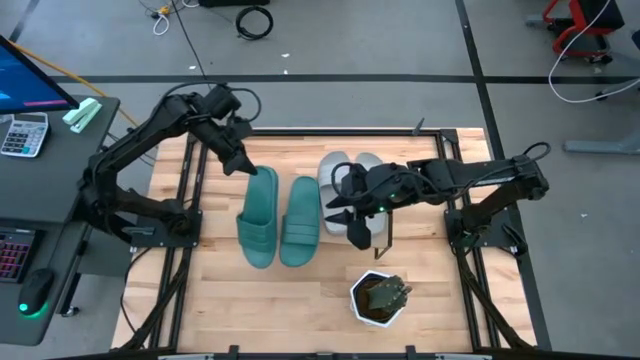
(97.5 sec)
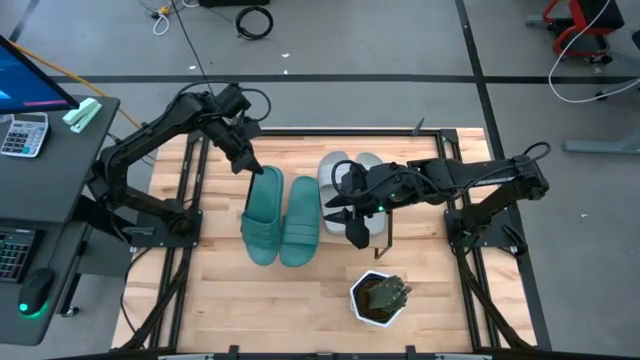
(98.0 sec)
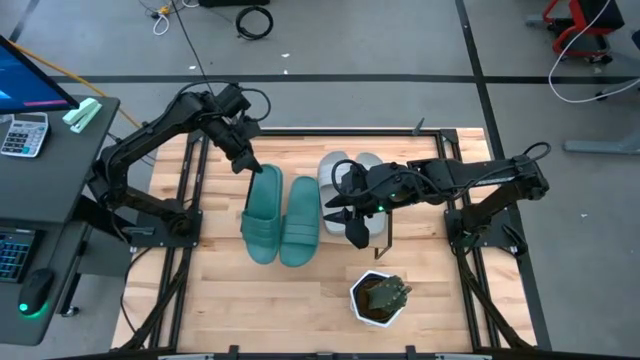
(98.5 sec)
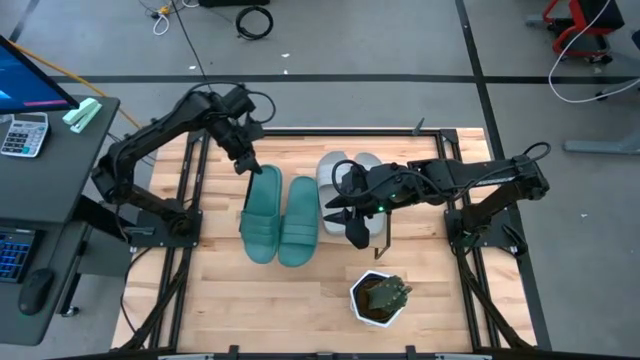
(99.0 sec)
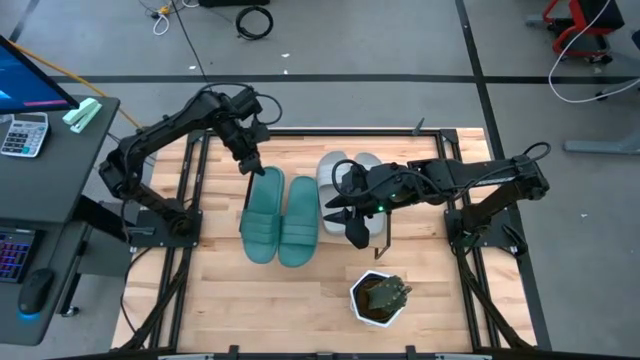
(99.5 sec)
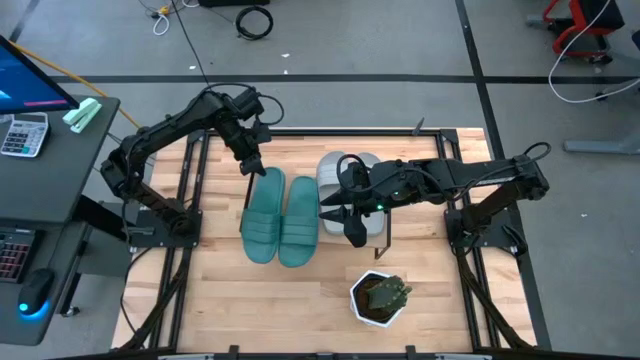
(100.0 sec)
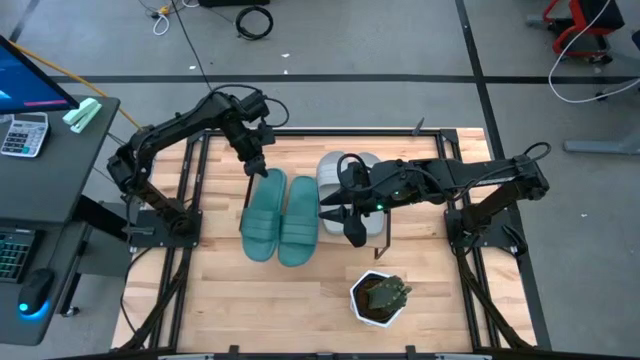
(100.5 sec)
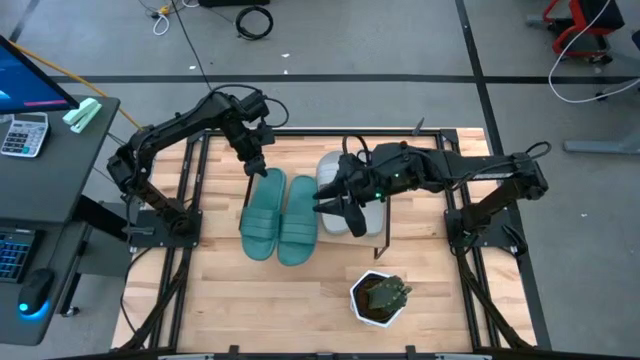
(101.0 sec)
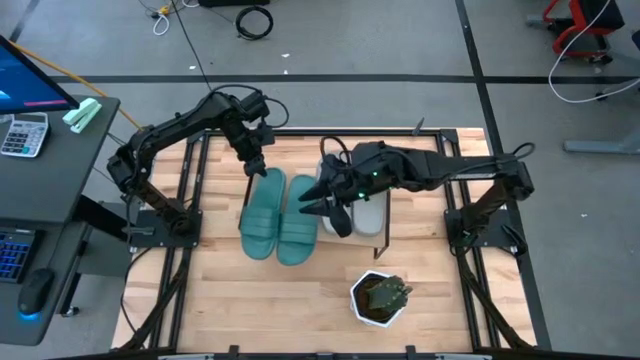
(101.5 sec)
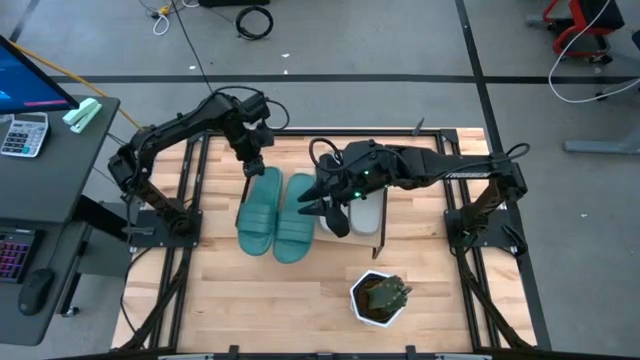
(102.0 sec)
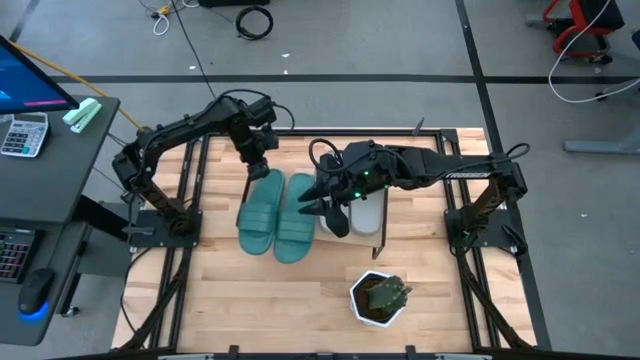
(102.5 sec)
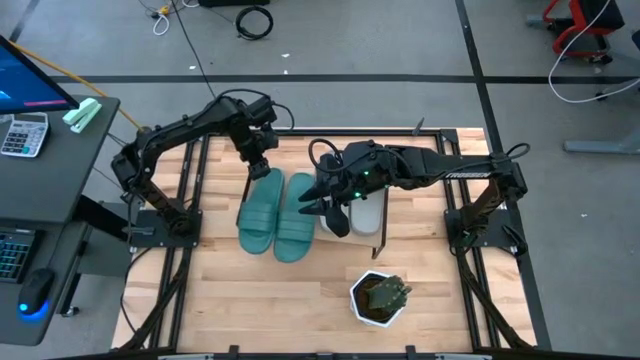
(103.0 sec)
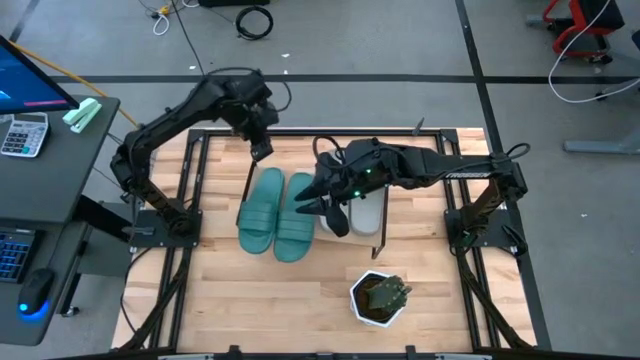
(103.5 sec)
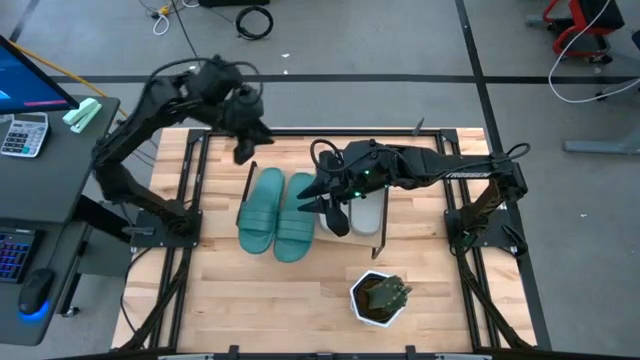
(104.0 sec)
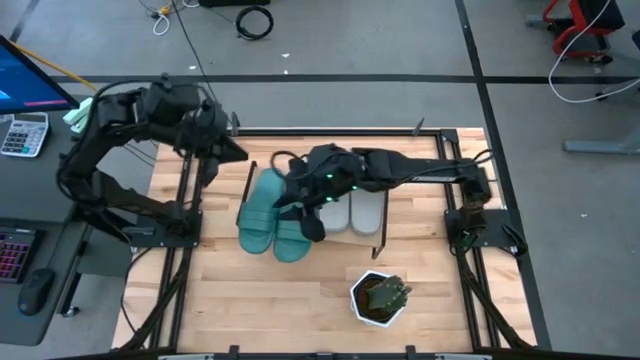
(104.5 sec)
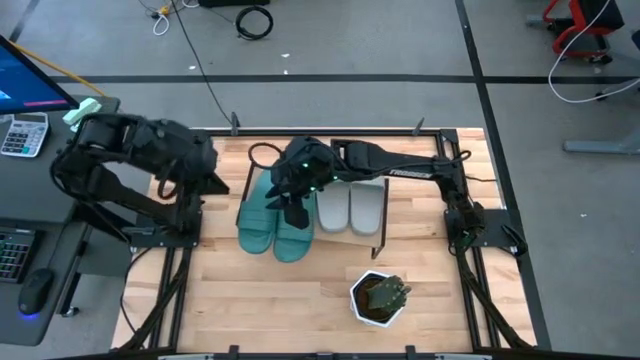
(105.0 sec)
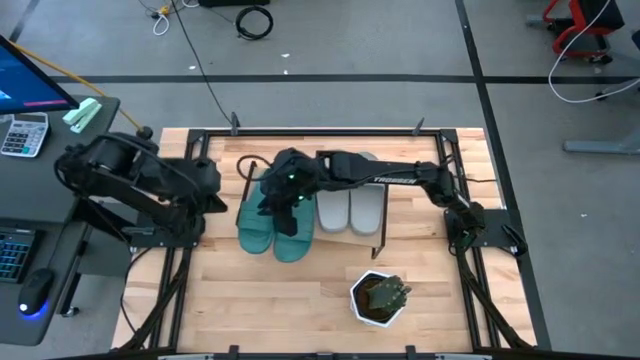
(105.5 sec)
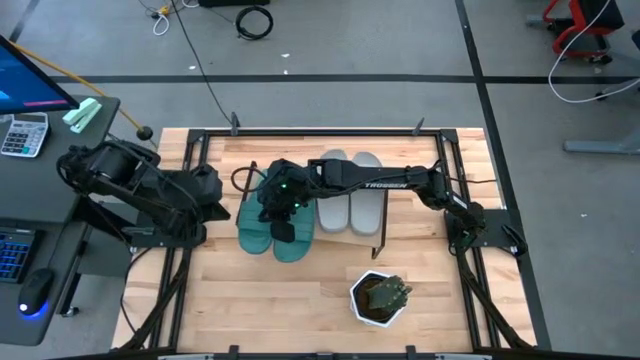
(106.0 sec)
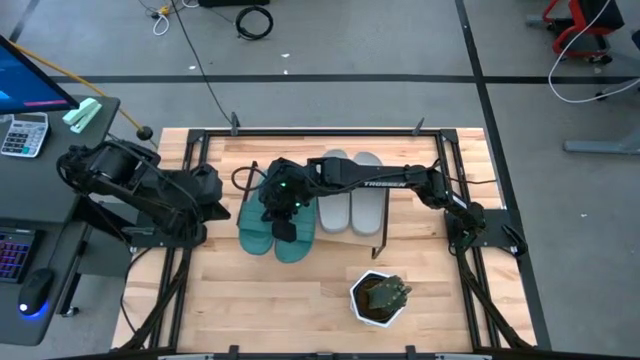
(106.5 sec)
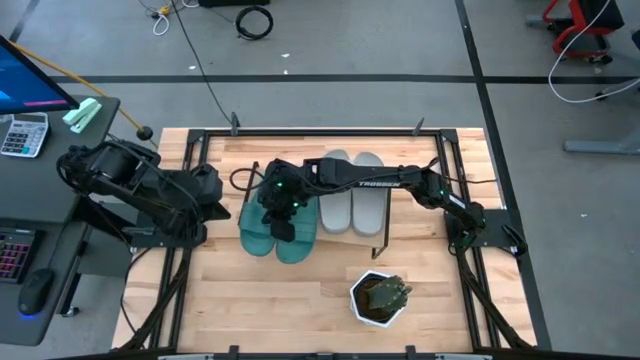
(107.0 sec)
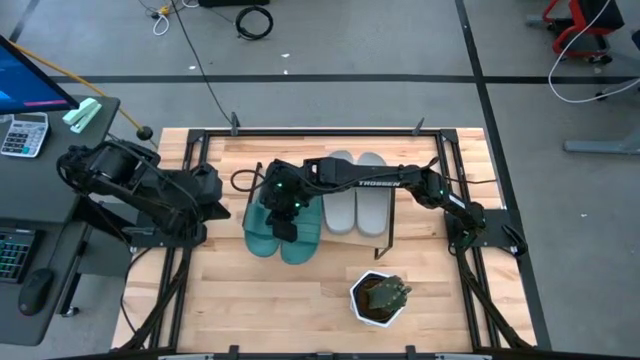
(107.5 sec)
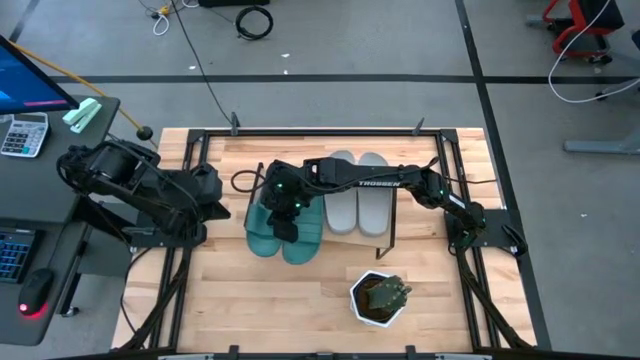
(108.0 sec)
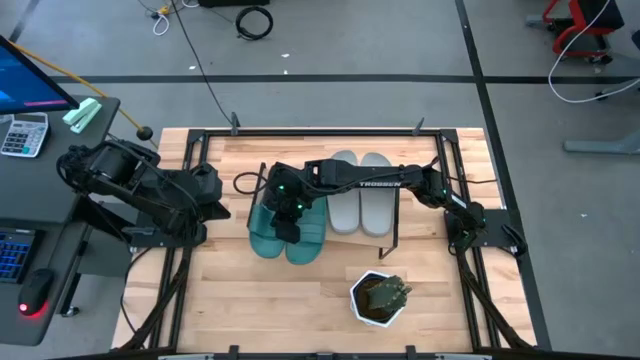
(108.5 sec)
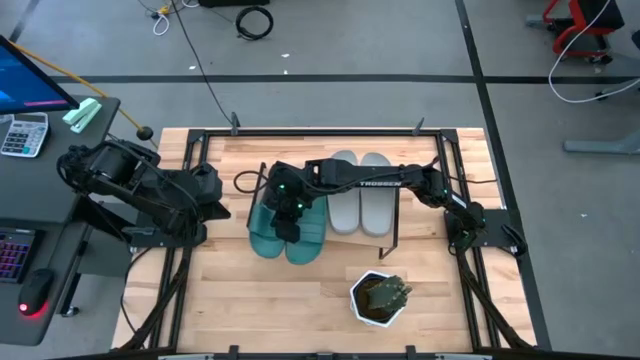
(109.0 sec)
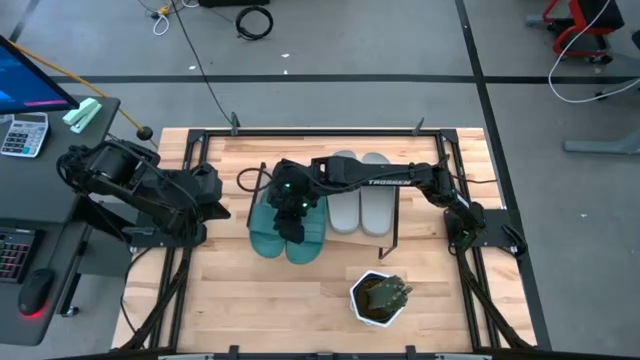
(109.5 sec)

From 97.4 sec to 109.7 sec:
Task: Pick and place slides into the shelf
Put the green slipper on the shelf

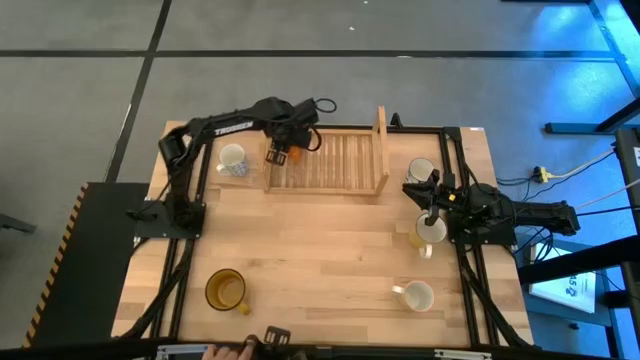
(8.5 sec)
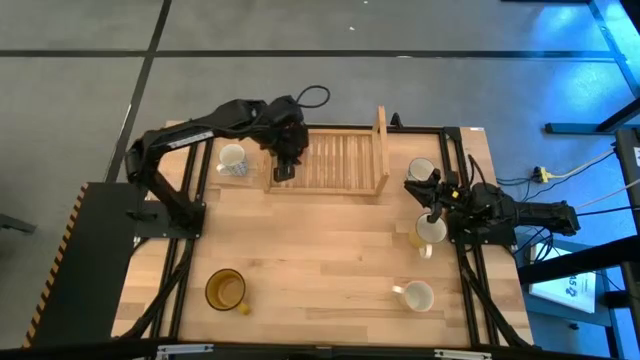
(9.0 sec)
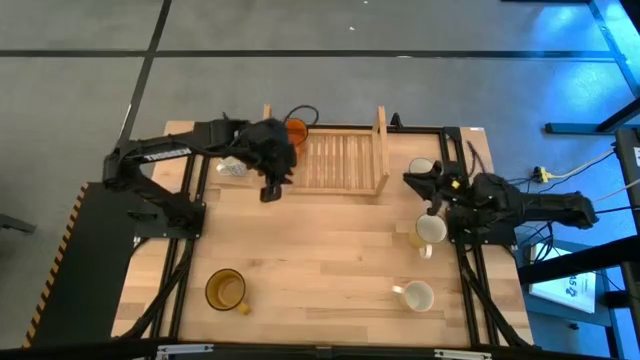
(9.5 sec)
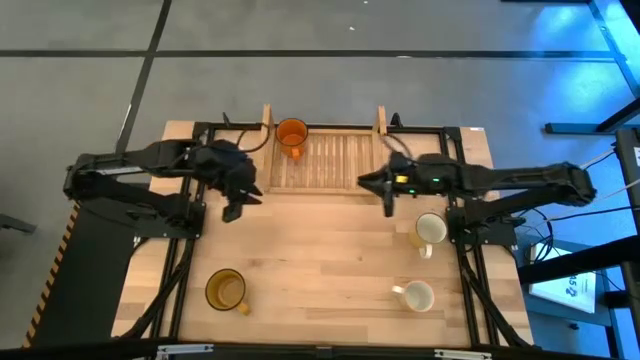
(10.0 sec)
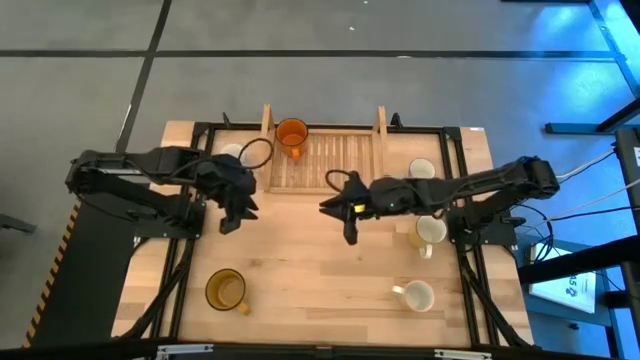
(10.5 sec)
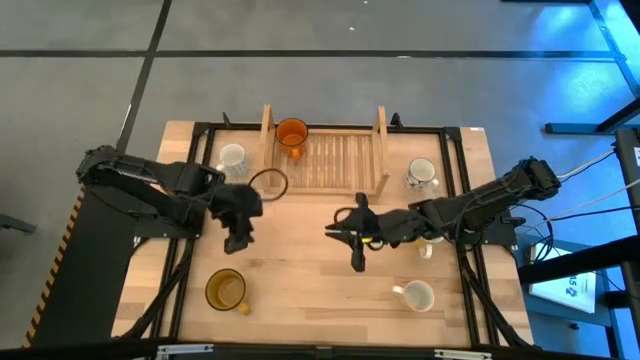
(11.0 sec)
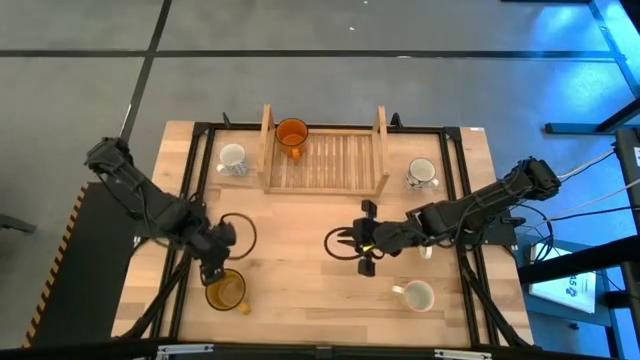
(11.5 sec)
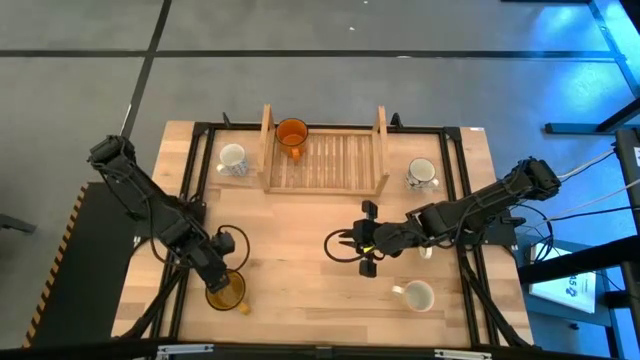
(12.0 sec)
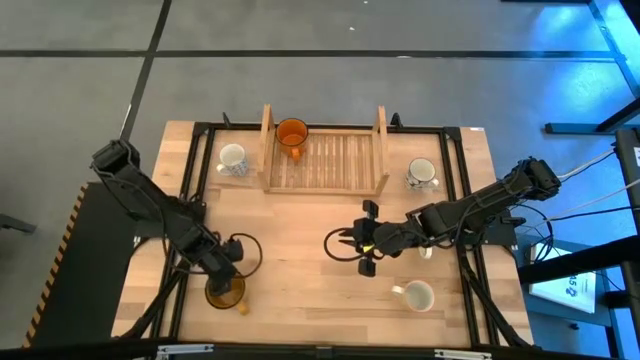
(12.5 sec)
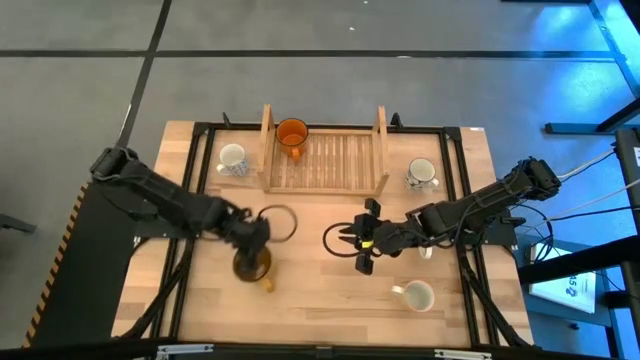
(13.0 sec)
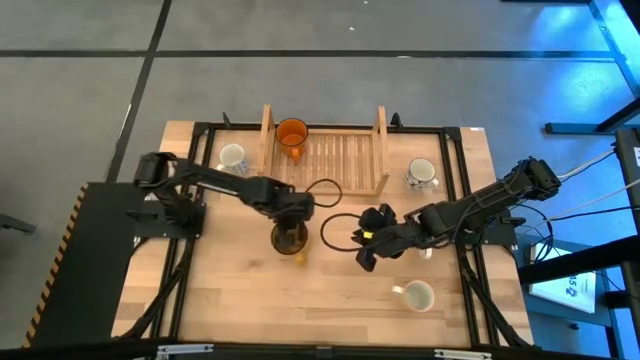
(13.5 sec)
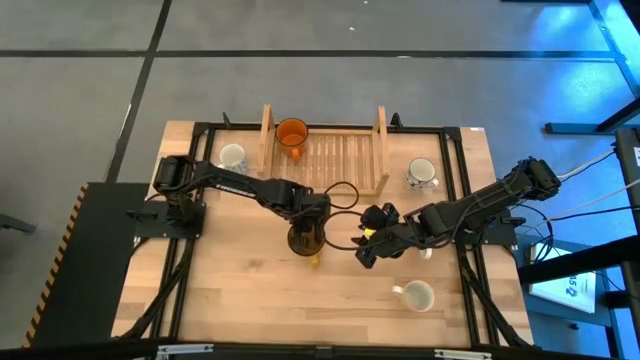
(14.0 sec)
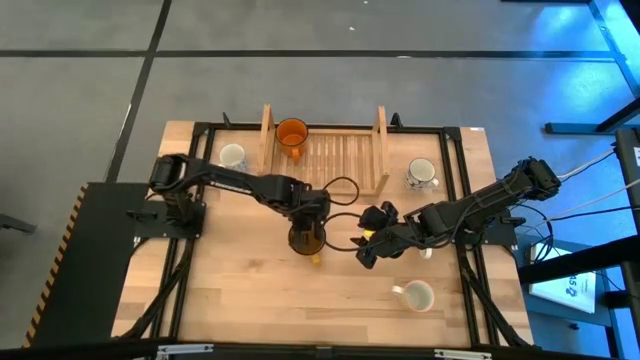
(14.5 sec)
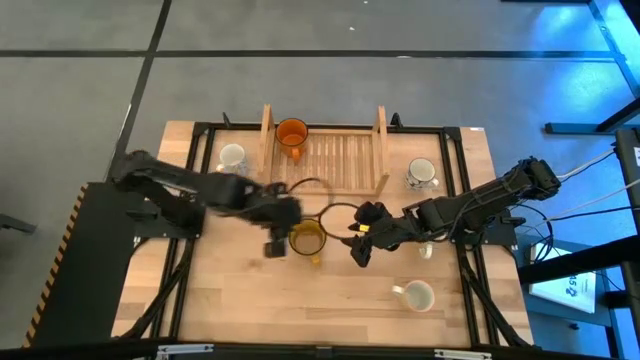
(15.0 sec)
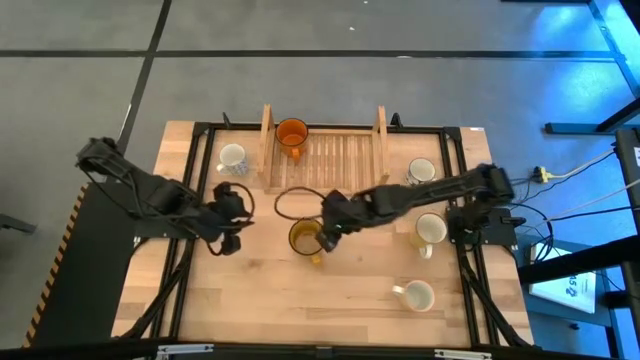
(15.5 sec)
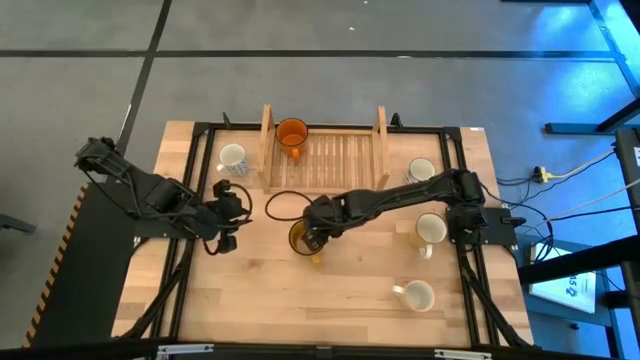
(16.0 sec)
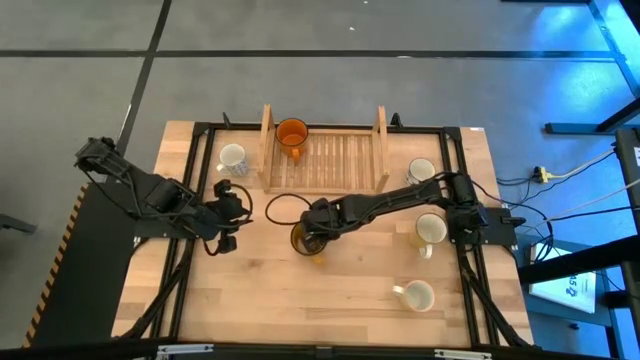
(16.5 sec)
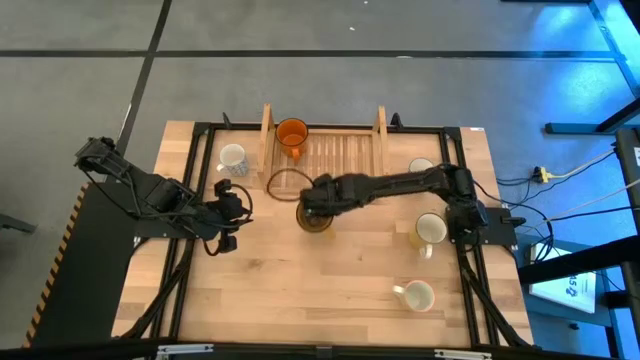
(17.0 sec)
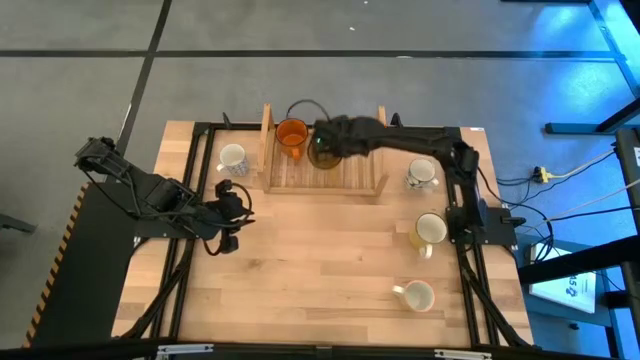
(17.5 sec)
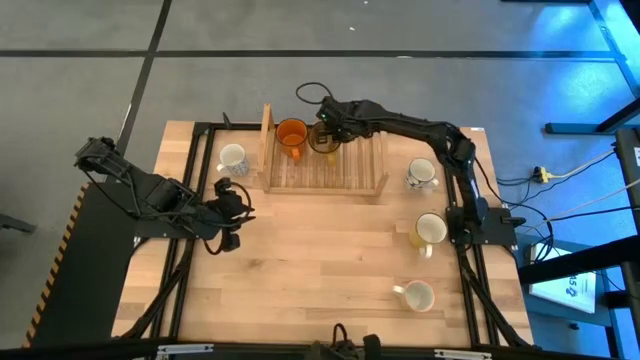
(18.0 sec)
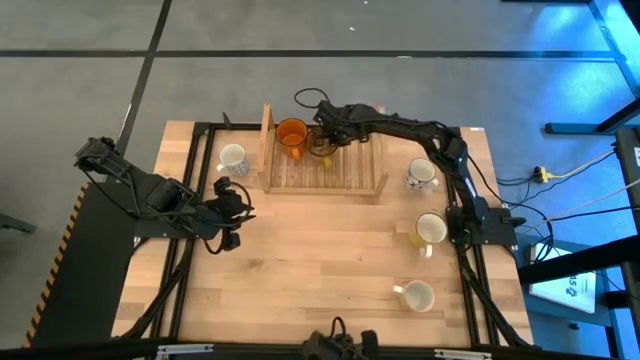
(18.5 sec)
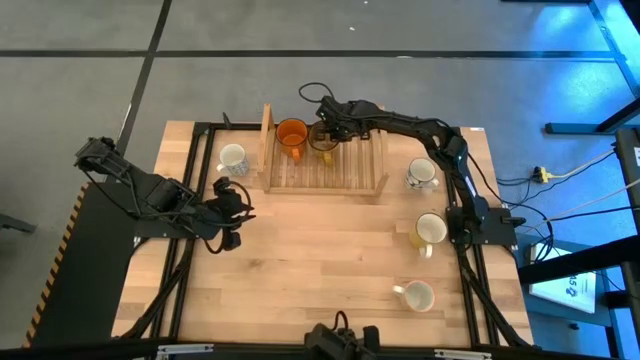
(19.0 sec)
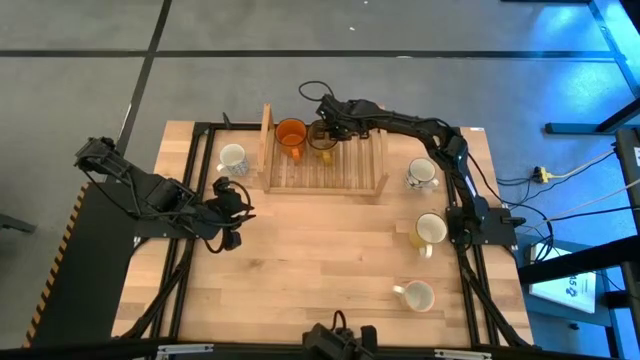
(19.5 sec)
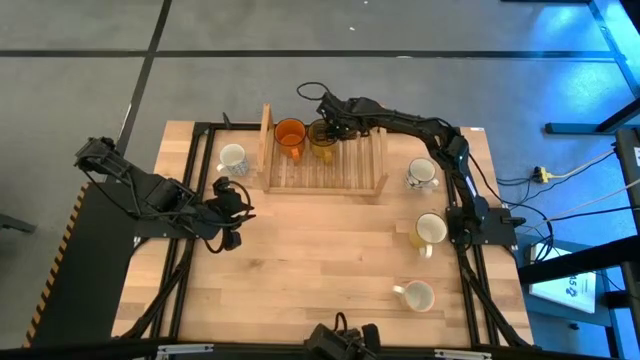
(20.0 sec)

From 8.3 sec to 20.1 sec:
Task: Place coffee mugs
Put the dark yellow mug on the shelf
